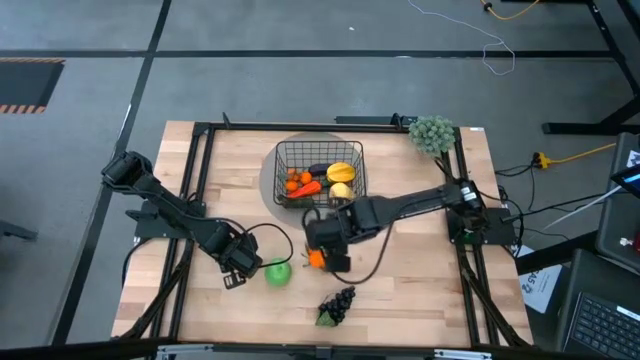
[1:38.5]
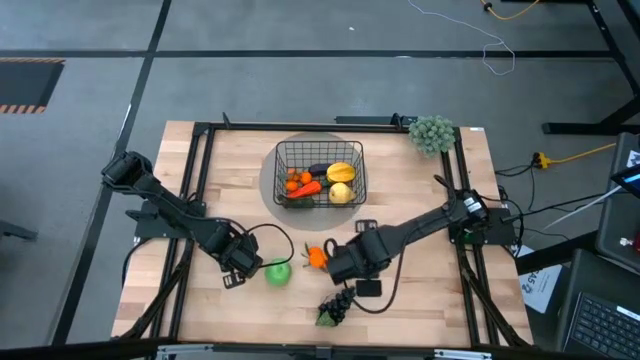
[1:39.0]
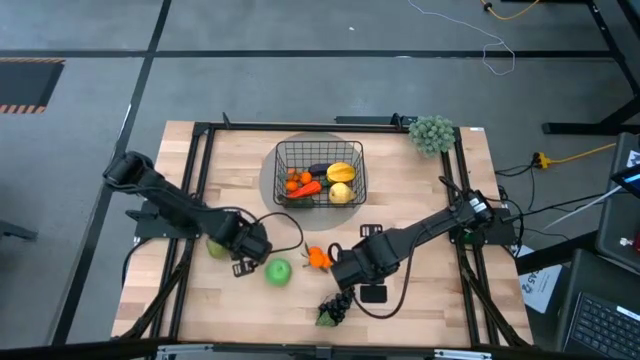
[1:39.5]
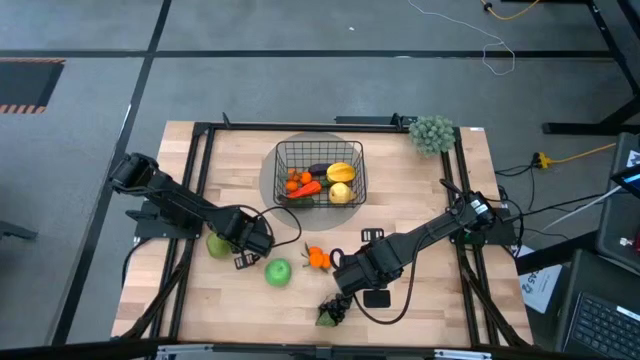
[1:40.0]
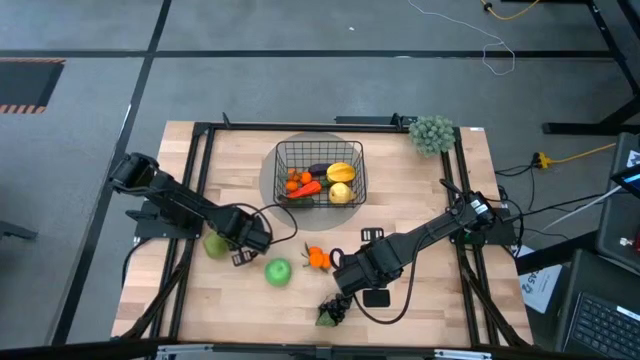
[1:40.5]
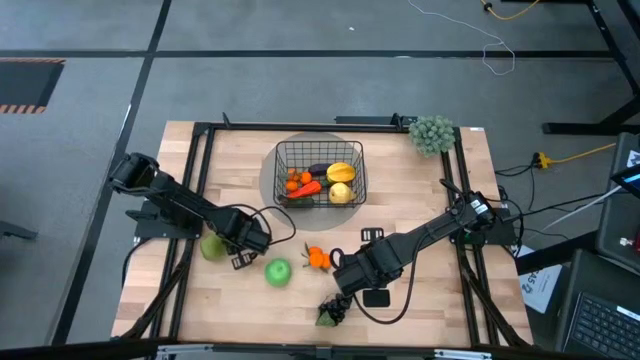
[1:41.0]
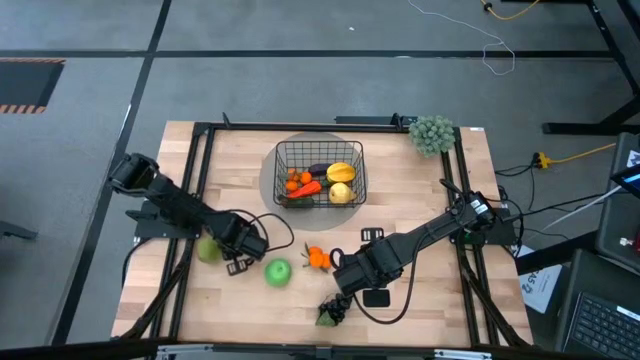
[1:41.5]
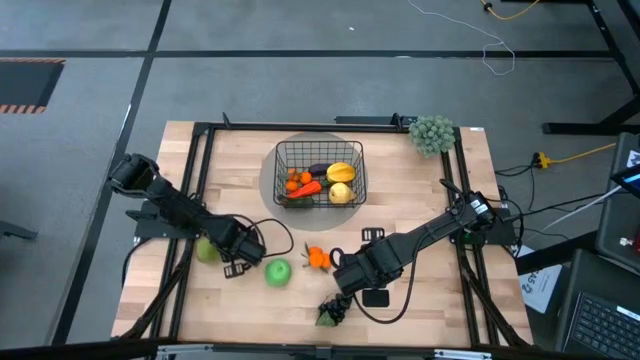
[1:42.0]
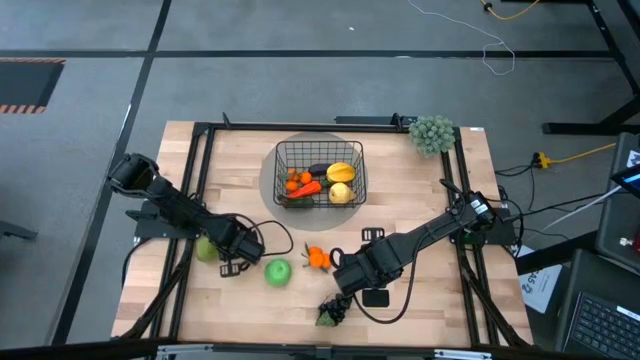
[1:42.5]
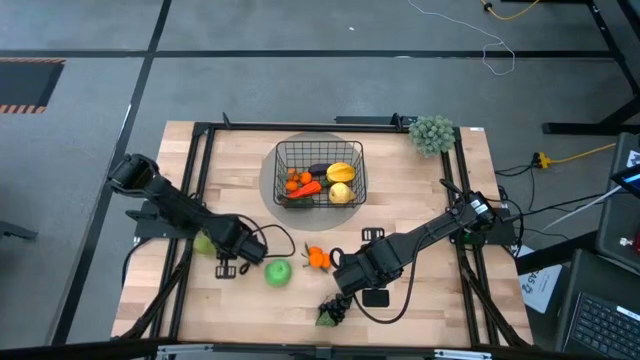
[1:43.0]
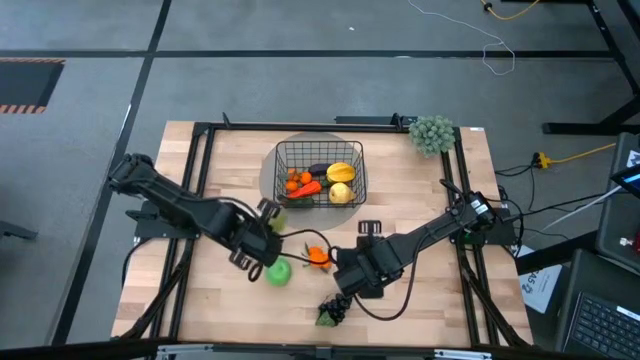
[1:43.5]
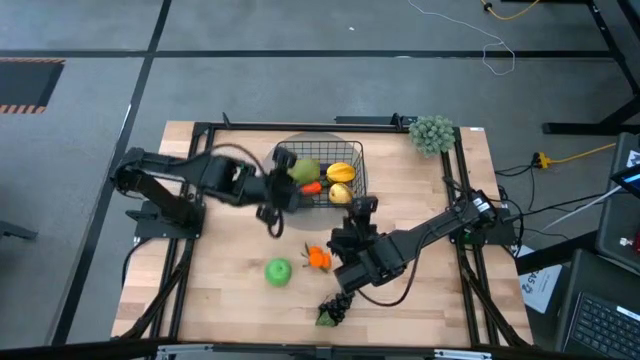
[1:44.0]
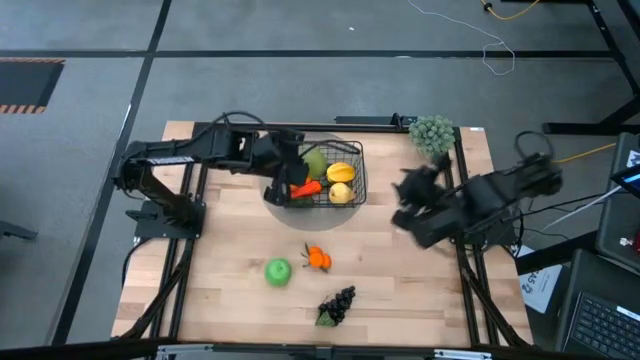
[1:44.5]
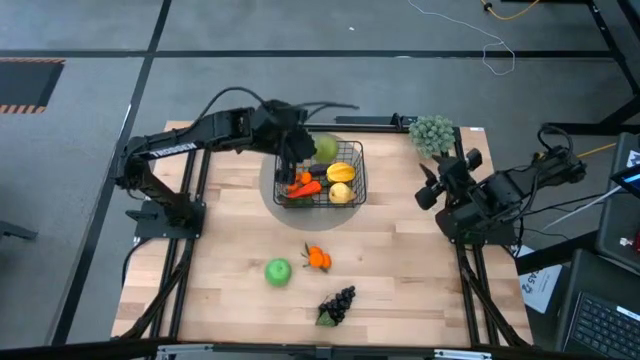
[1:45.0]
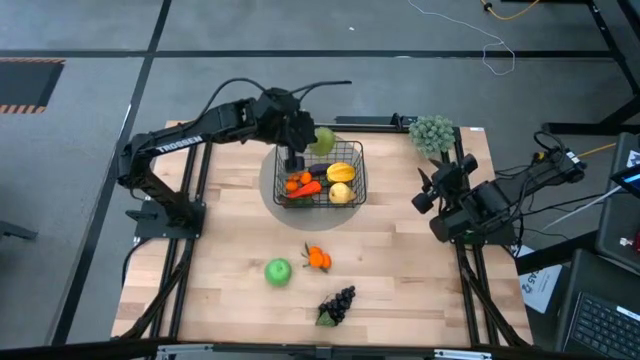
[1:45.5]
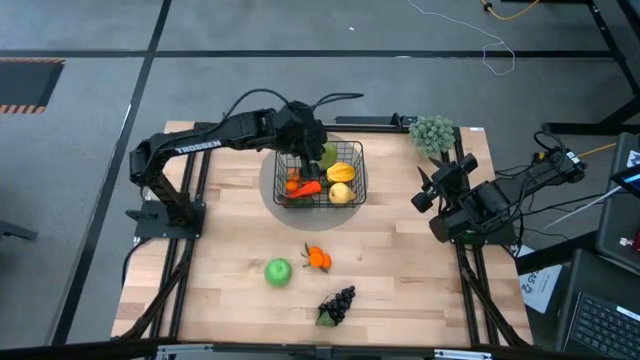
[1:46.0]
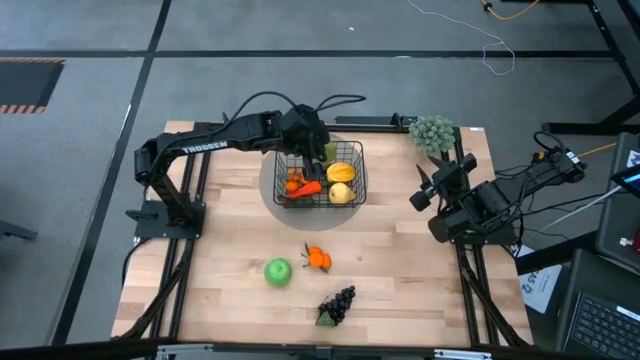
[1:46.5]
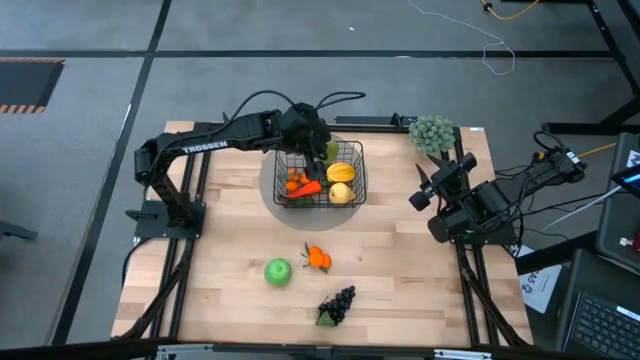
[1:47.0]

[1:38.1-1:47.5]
Task: Build produce basket
Put the green pear into the wire basket

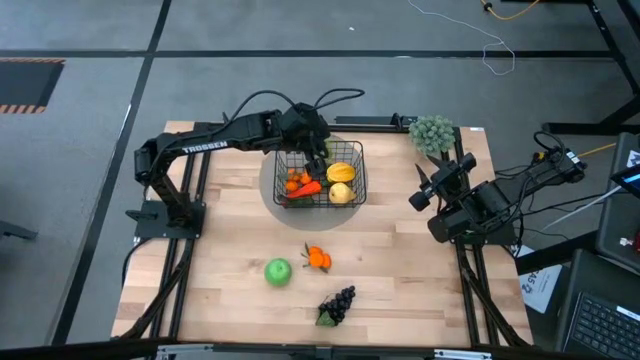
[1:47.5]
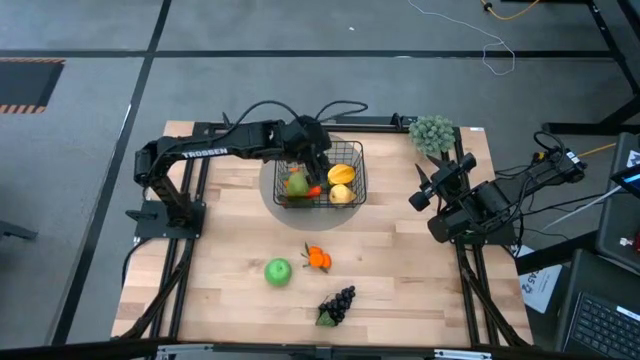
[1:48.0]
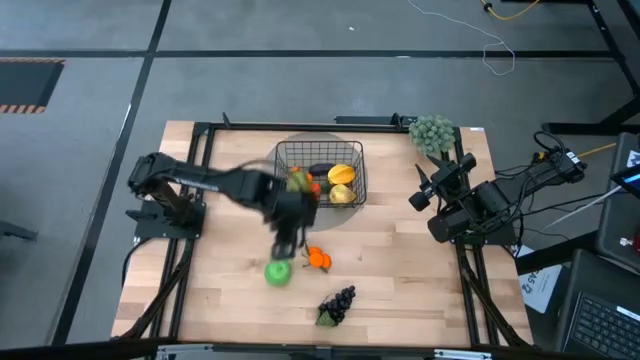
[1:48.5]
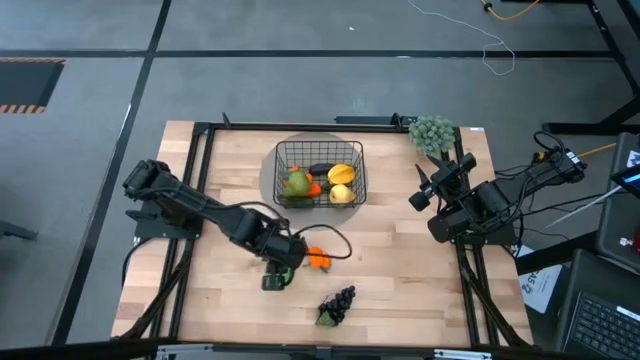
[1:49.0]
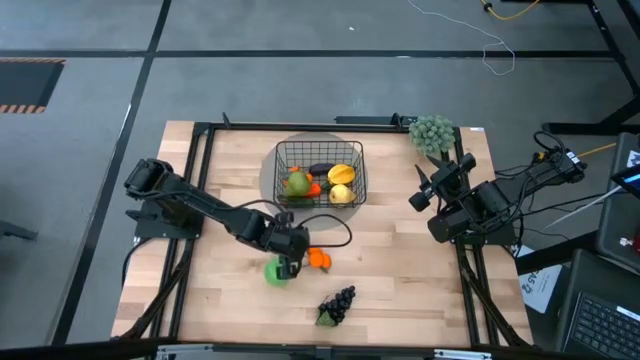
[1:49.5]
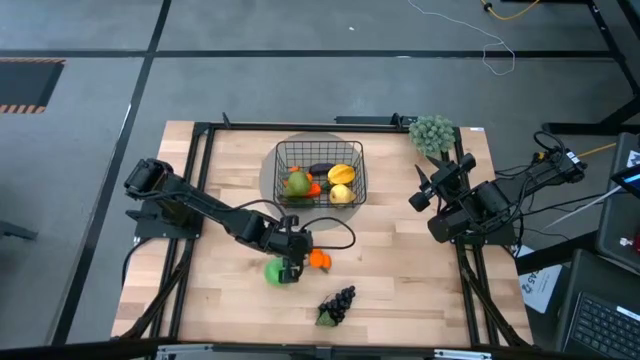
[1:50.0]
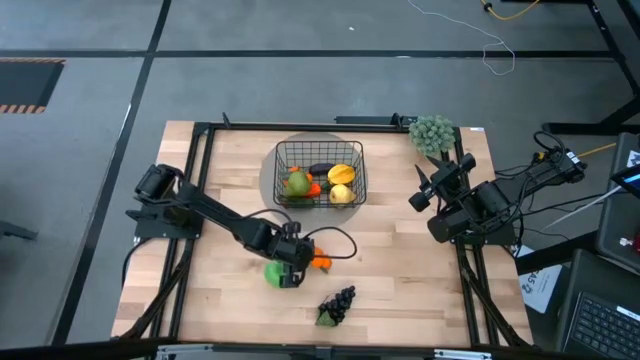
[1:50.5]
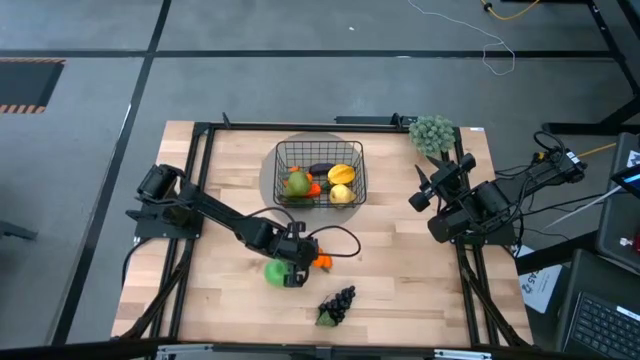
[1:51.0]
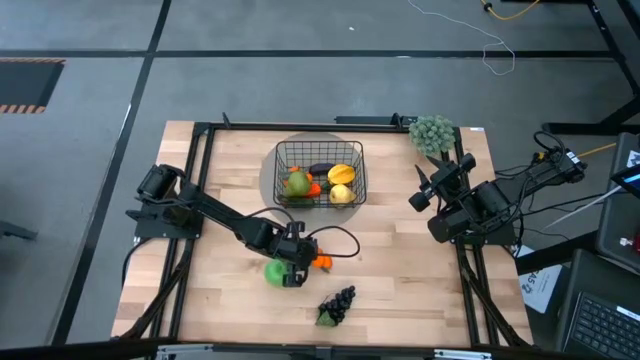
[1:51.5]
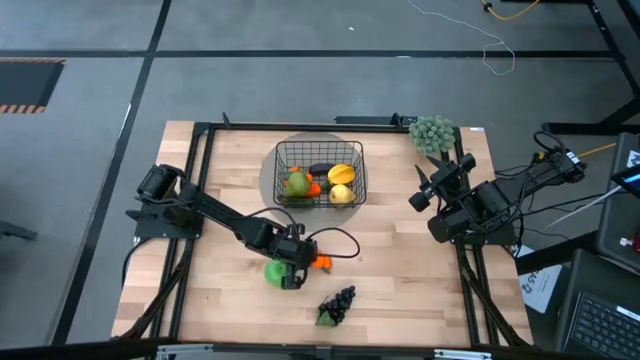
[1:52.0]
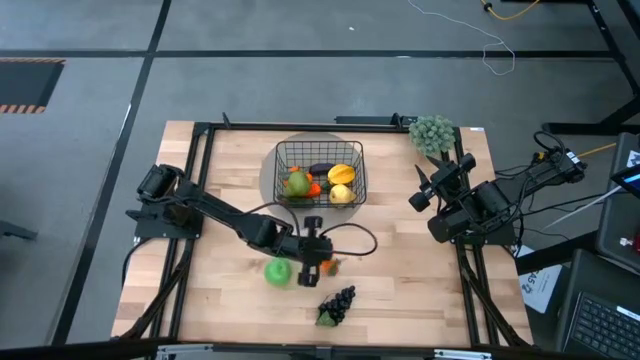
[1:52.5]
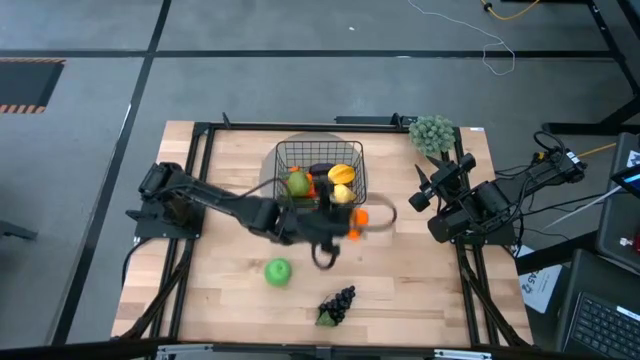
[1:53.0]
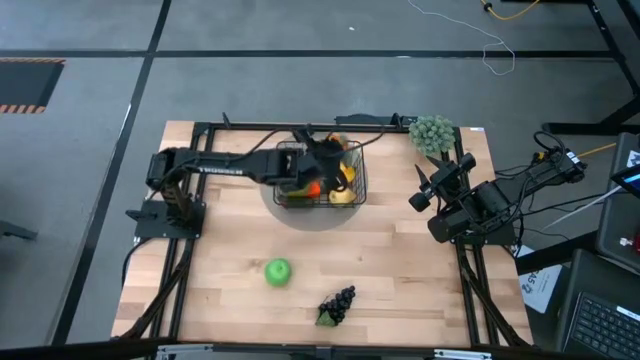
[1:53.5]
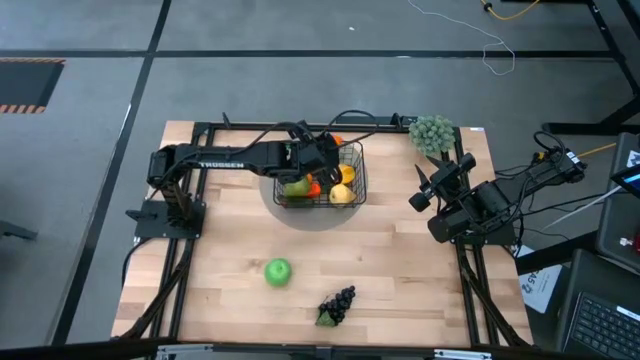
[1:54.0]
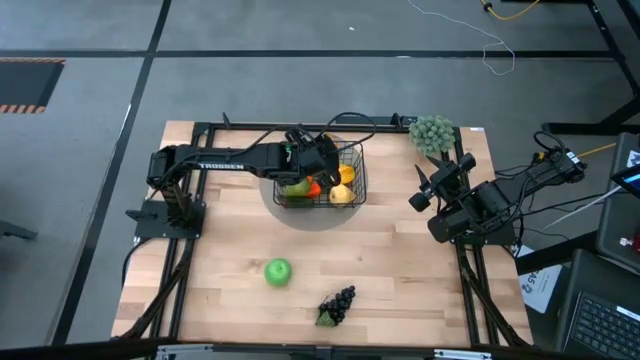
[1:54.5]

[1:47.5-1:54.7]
Put the orange tangerines into the wire basket

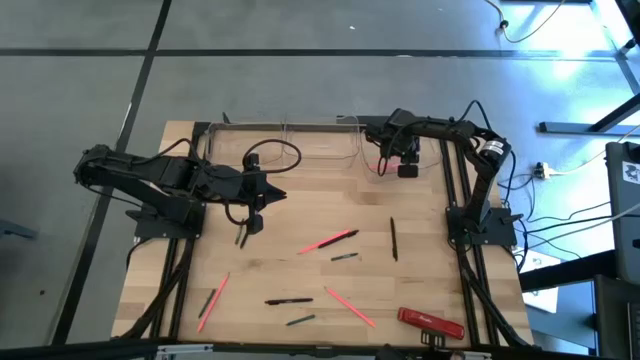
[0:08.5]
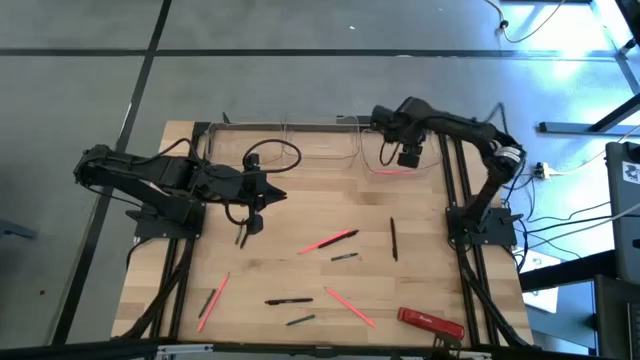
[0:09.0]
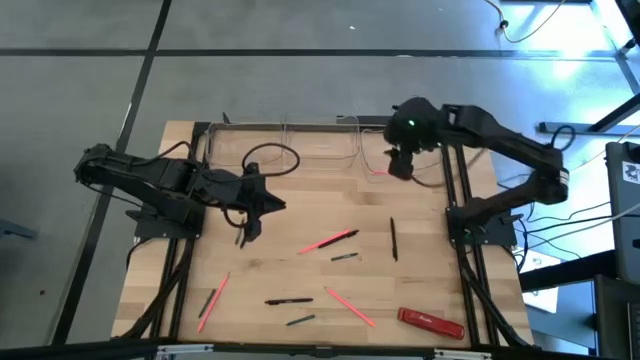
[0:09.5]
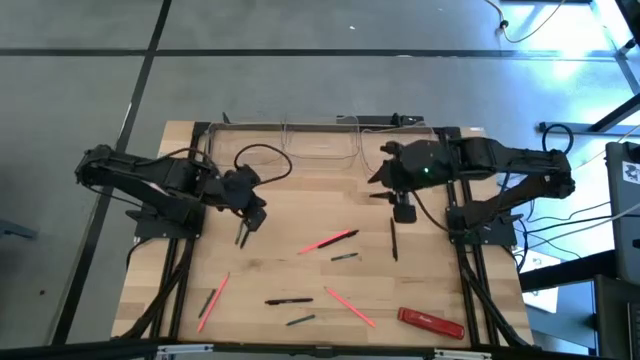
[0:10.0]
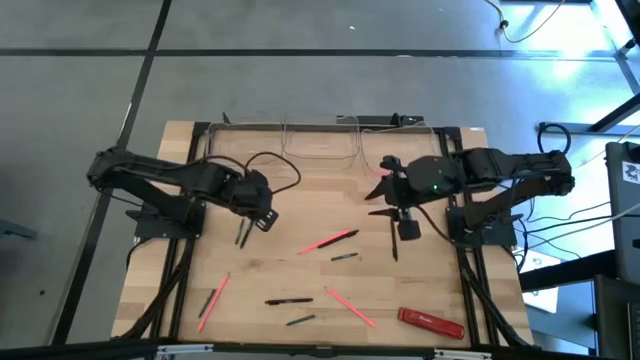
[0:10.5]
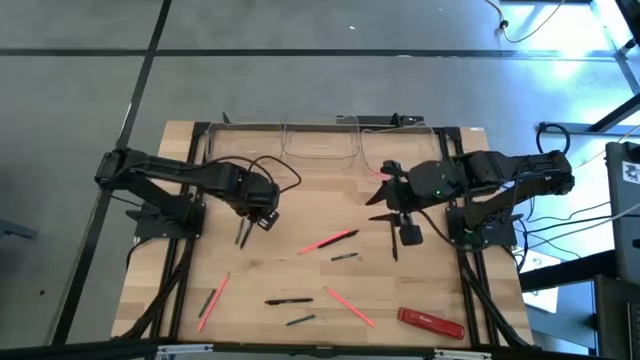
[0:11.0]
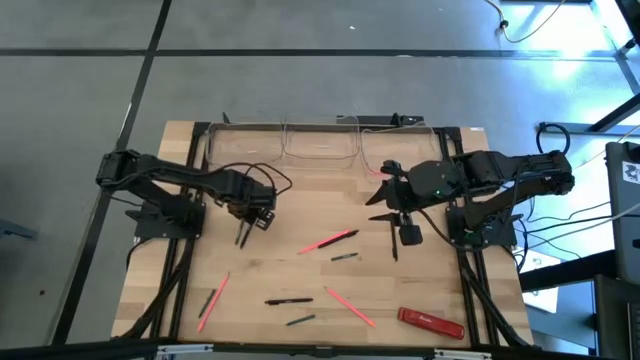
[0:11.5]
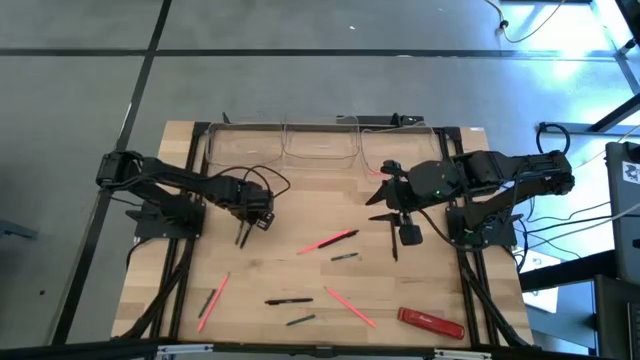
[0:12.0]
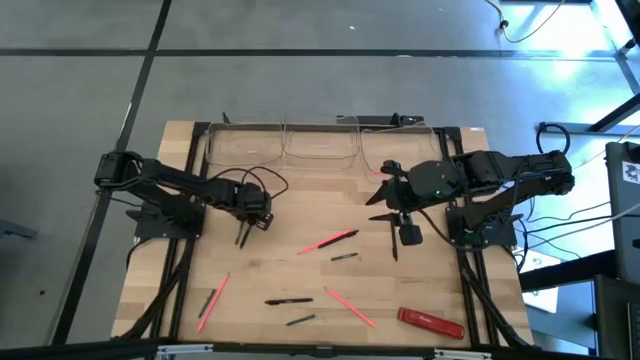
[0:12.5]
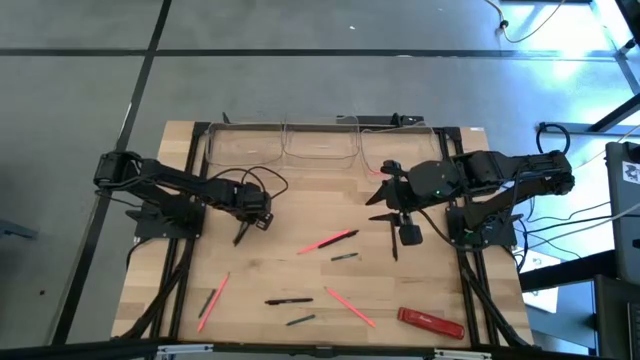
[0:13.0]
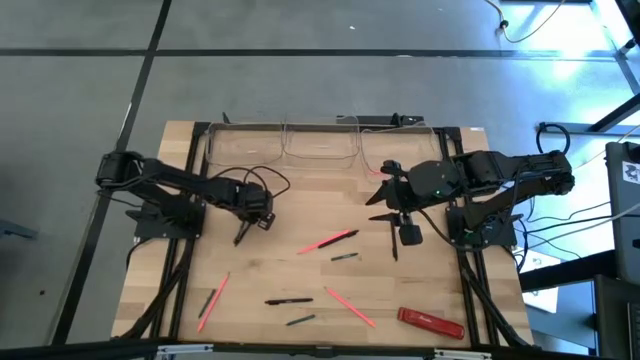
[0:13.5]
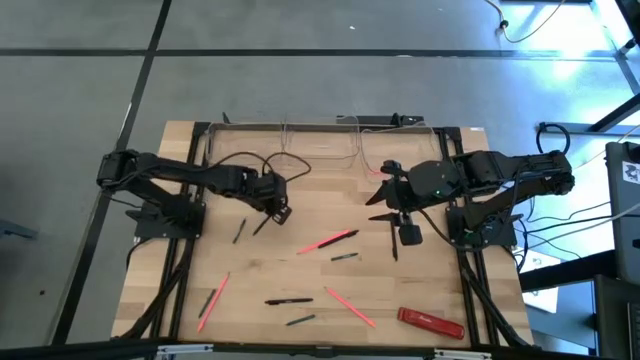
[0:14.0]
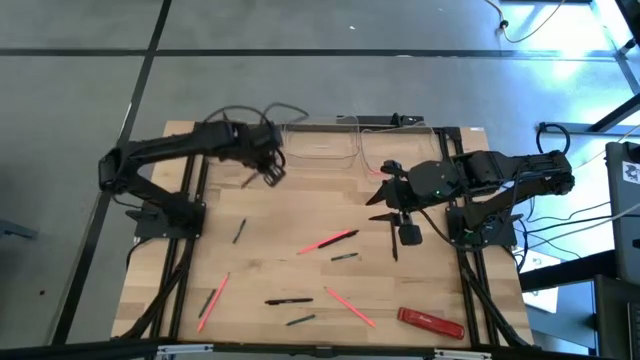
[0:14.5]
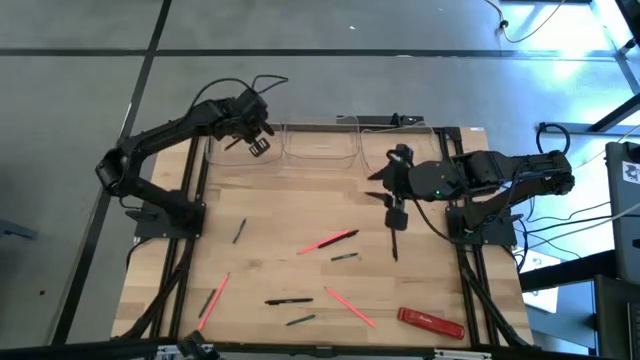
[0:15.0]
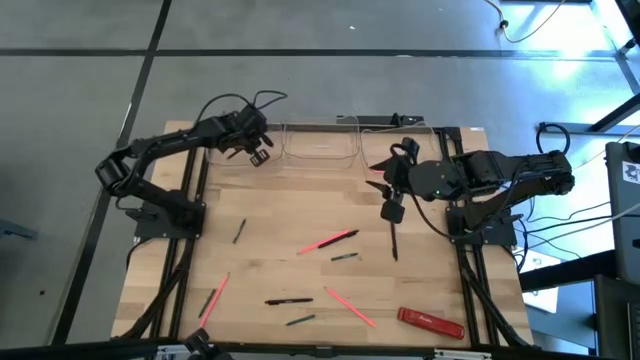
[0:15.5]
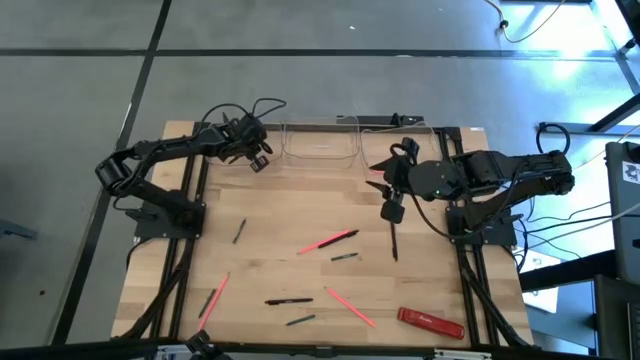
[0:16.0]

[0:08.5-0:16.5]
Task: Sort crayons/erasers/pens/pencils in bins
Put the black pen into the left transparent bin
